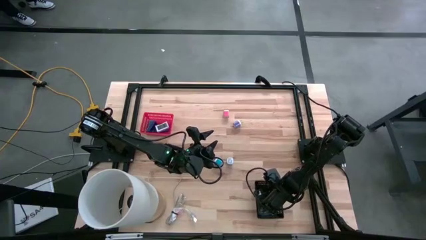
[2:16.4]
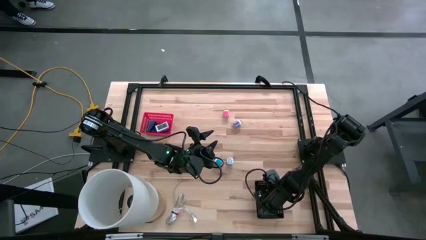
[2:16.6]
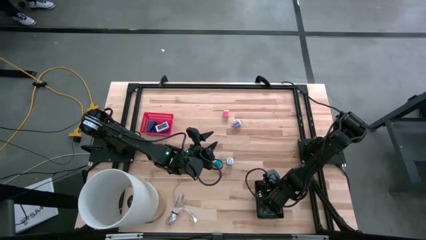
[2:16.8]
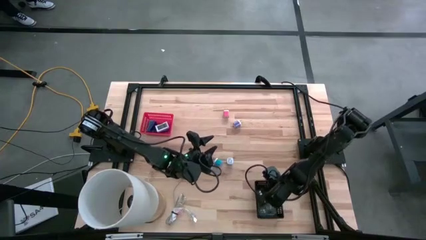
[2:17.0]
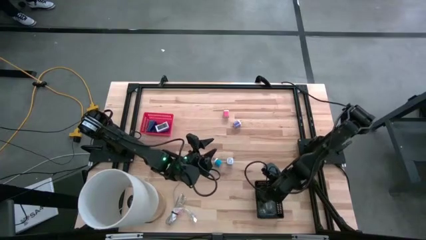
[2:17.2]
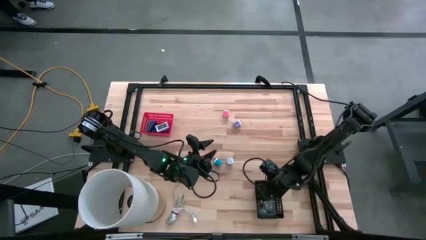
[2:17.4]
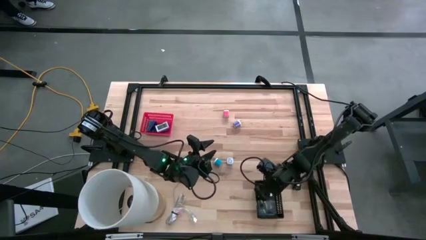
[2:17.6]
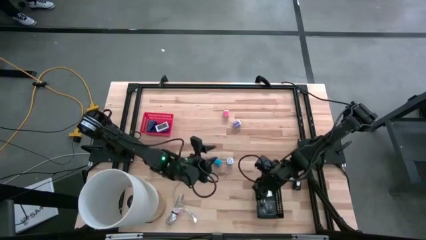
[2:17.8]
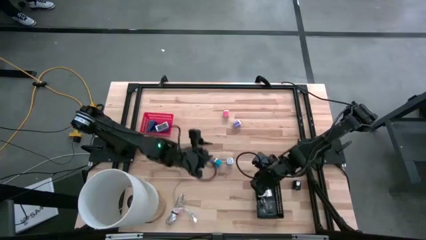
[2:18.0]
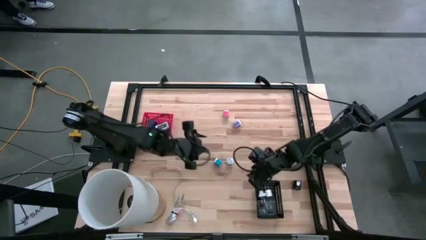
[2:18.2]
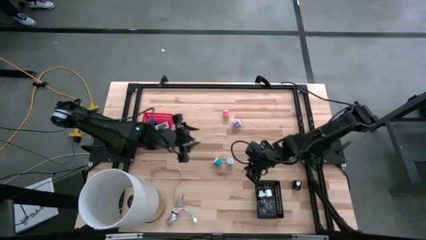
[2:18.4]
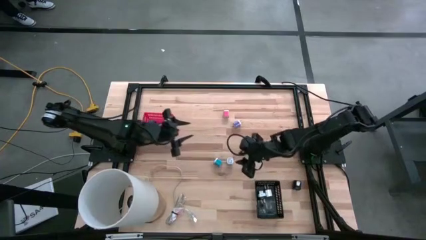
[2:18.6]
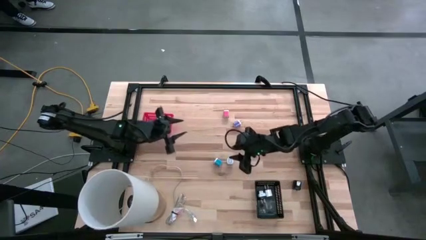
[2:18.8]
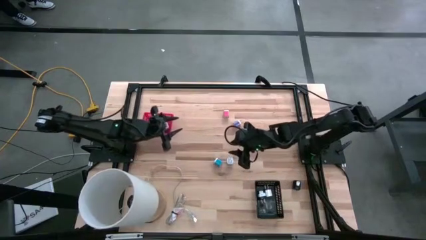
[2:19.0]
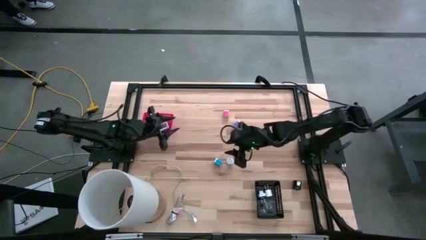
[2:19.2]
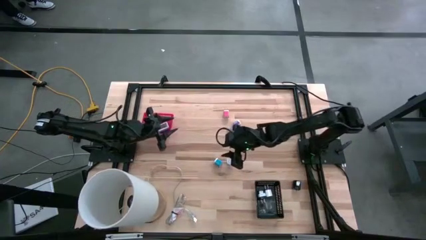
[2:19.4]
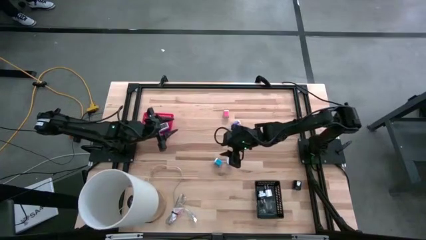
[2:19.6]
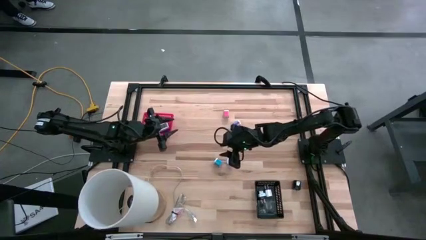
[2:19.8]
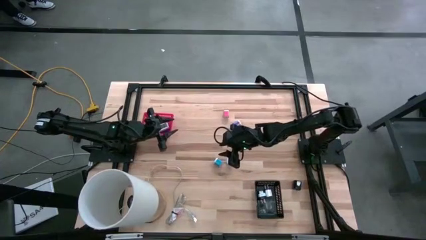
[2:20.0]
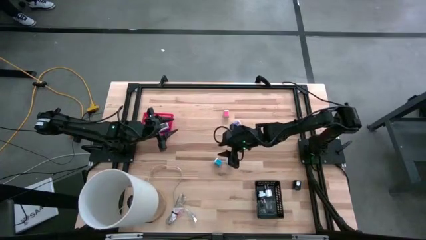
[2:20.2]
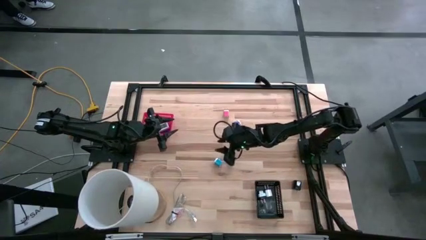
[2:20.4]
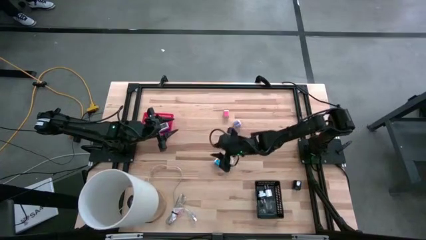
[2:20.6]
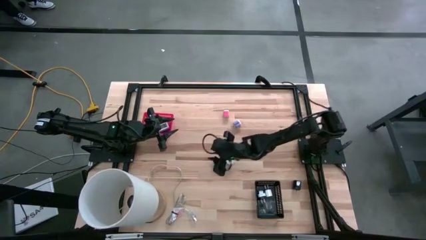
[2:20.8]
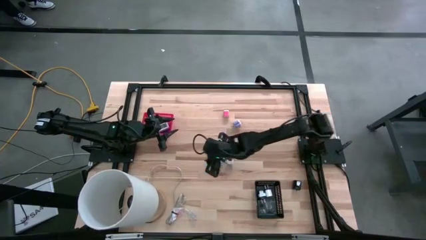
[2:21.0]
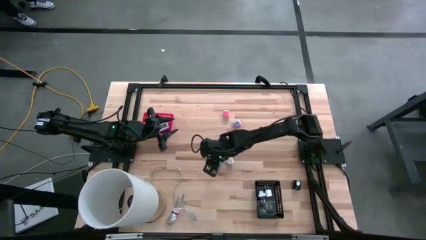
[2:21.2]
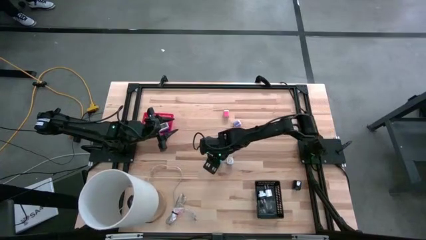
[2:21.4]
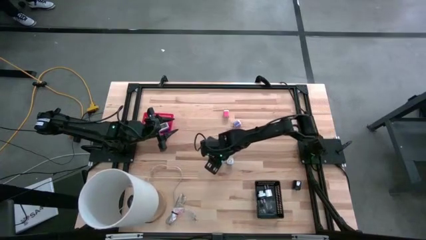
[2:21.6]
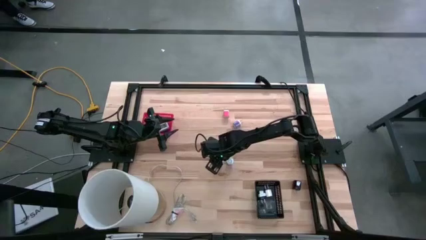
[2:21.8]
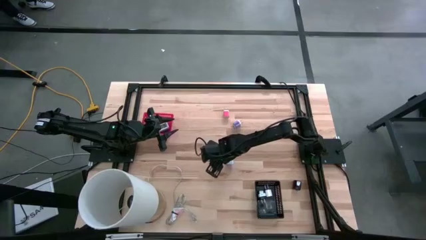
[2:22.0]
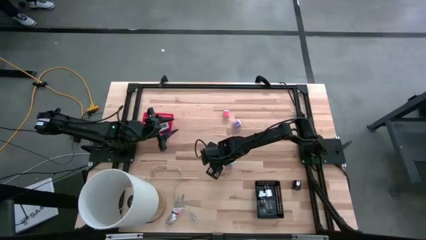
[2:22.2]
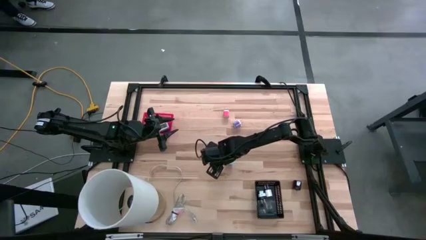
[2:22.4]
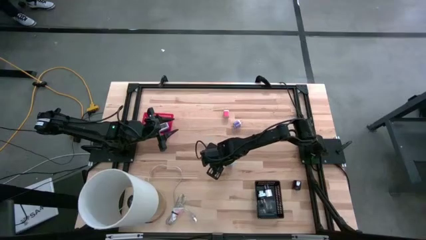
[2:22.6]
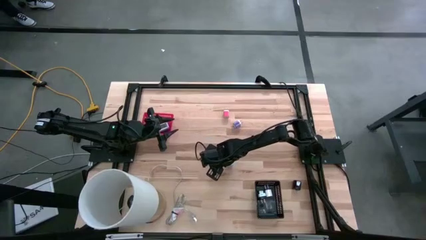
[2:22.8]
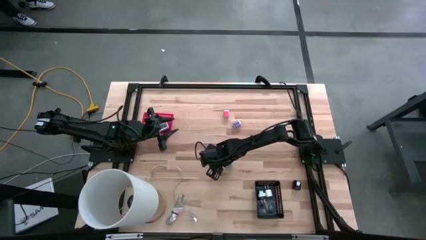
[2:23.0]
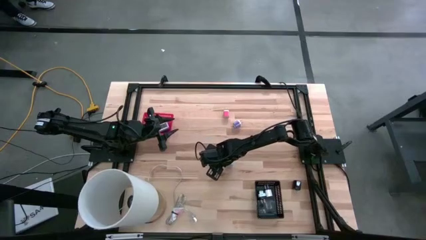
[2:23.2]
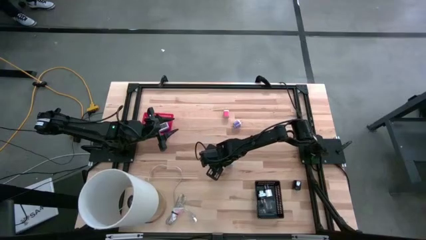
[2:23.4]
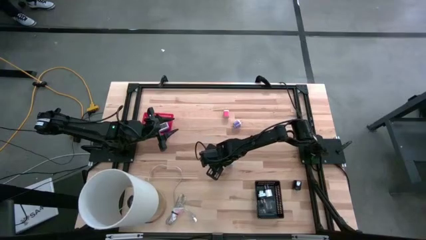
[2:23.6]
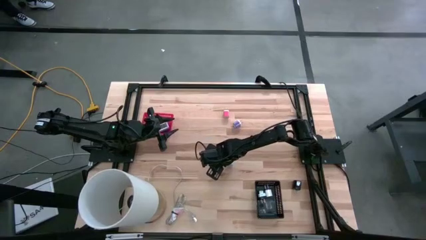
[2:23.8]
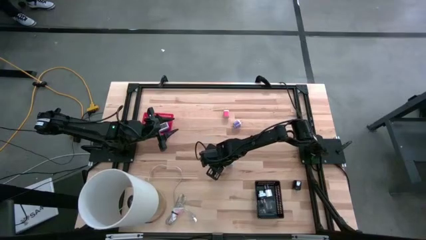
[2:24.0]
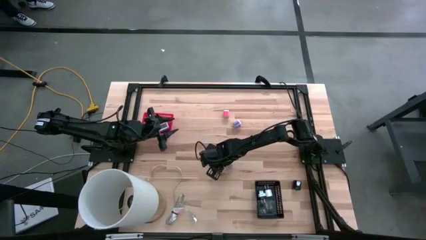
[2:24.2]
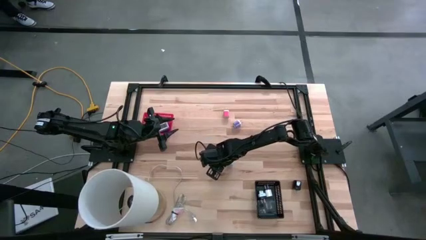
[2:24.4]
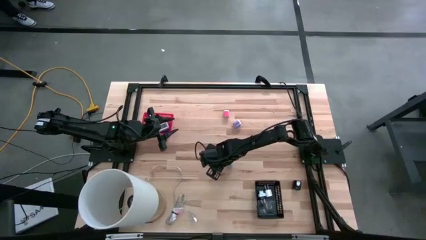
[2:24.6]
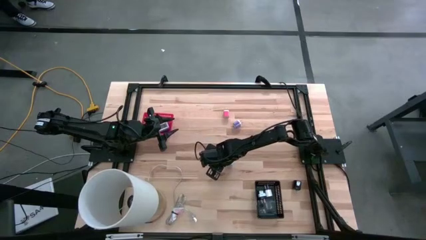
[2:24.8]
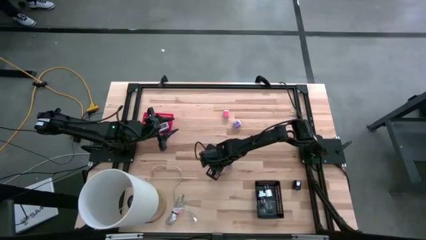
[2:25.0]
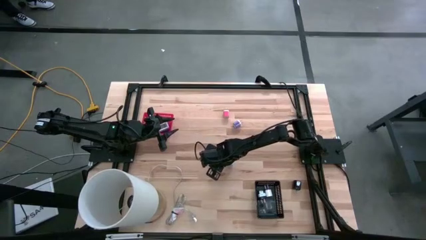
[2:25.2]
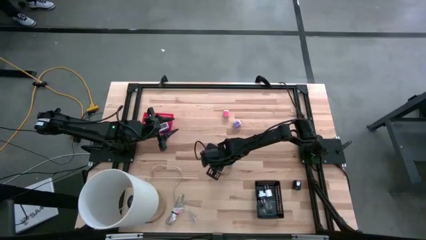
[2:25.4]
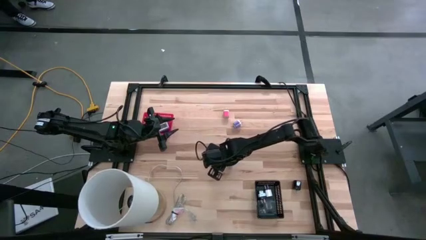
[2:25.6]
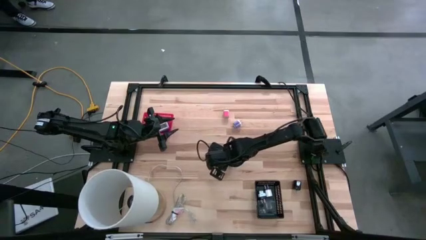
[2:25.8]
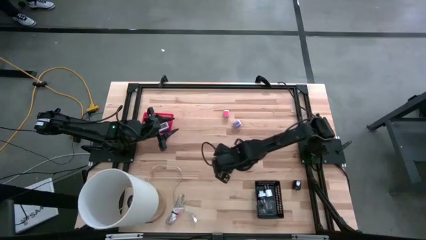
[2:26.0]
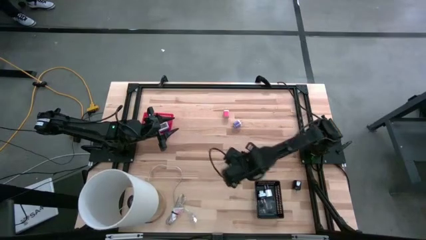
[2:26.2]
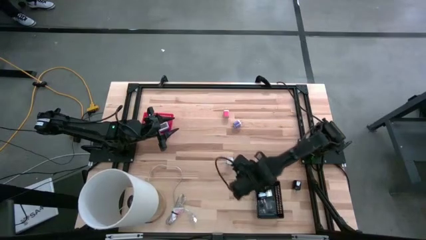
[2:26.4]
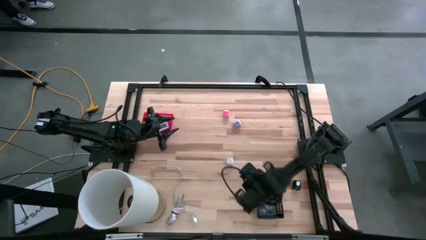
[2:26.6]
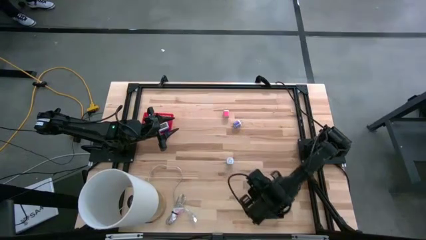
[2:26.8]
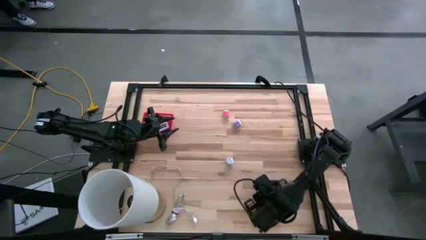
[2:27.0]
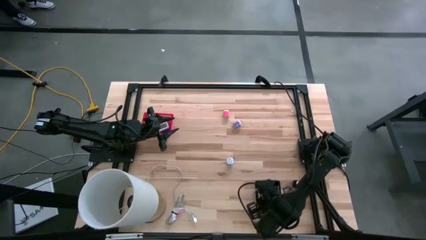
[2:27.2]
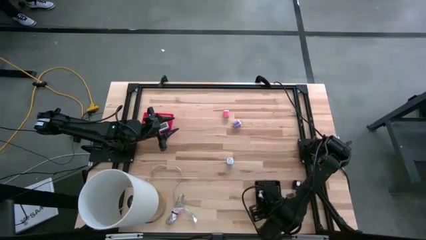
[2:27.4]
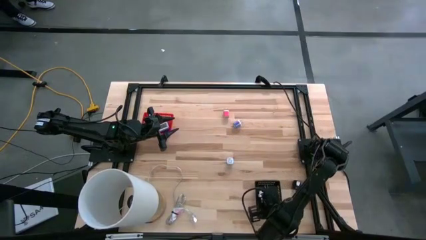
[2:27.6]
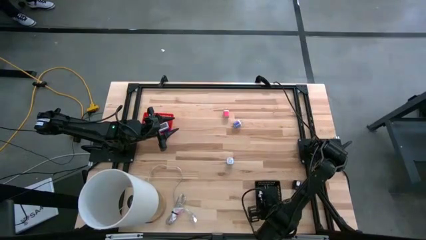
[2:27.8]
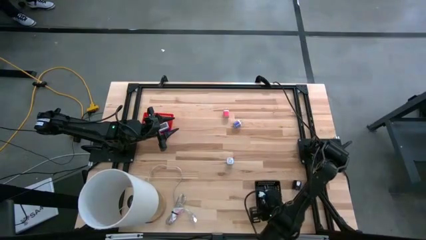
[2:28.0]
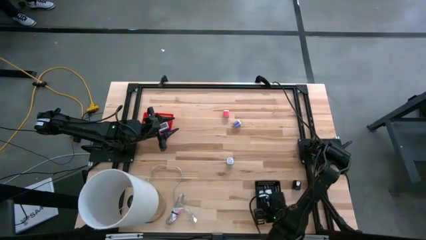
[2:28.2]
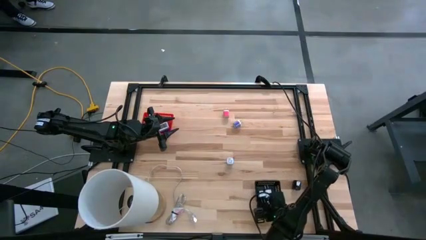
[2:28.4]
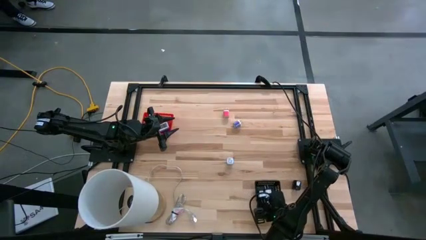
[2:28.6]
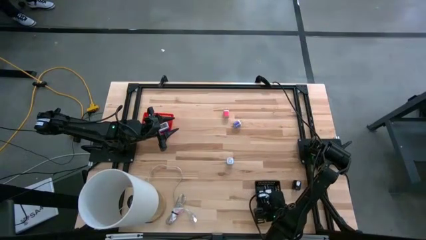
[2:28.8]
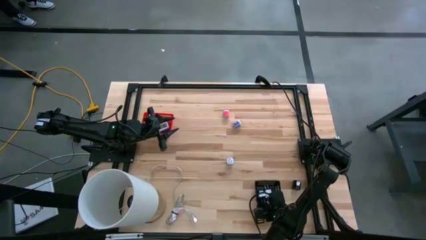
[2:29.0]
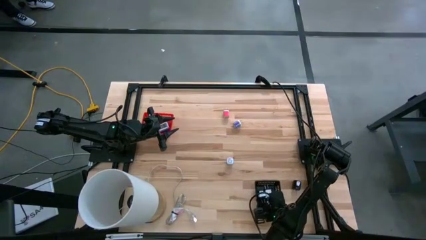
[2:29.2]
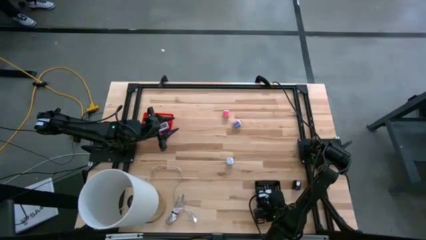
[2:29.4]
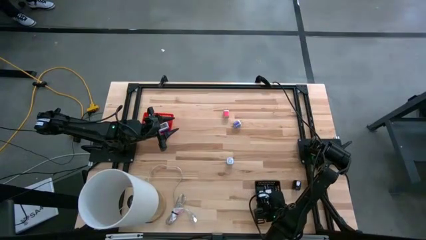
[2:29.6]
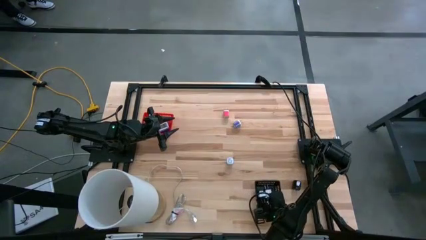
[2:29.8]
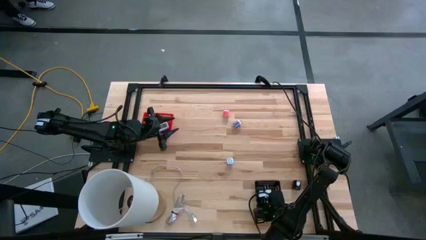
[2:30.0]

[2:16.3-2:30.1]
Task: Pick & Place Office items
Put the left blue charger adapter into the black bin
